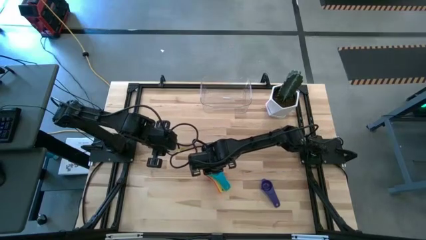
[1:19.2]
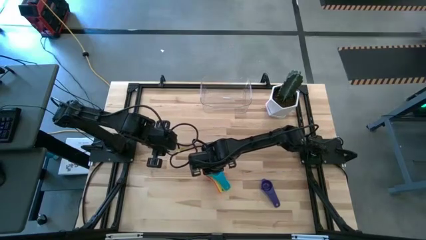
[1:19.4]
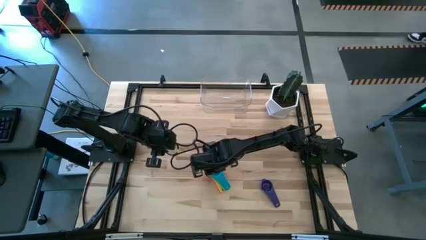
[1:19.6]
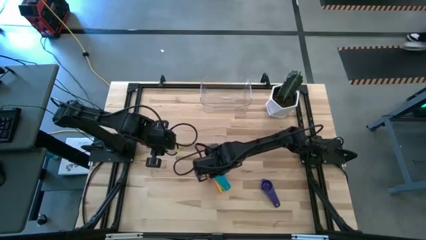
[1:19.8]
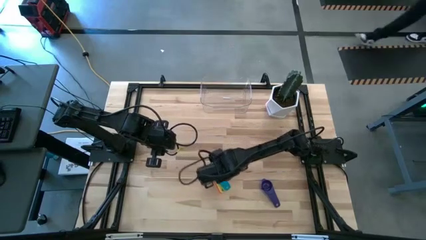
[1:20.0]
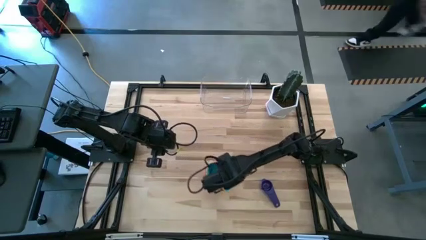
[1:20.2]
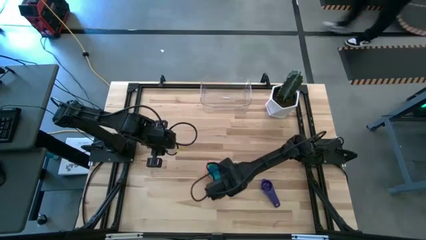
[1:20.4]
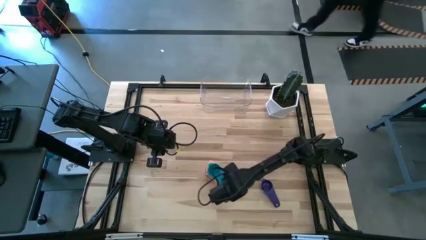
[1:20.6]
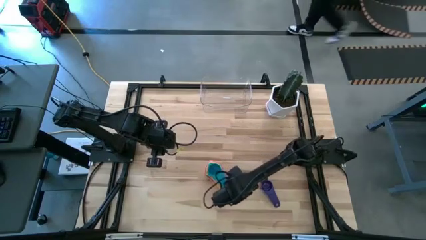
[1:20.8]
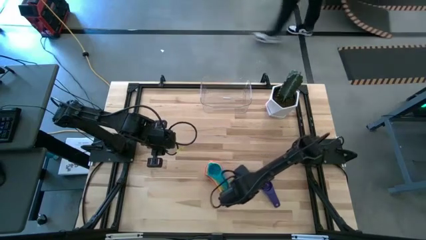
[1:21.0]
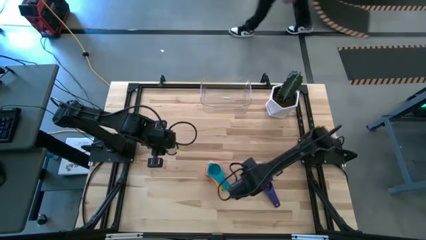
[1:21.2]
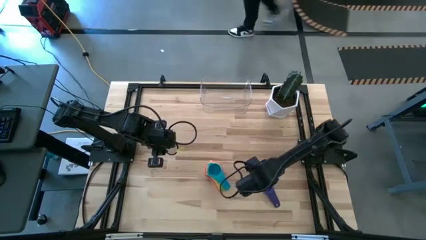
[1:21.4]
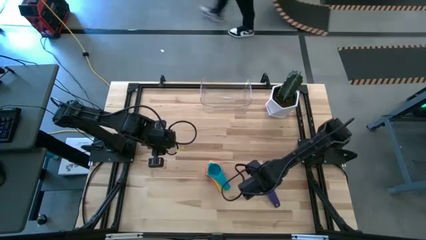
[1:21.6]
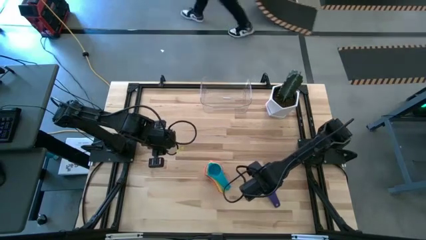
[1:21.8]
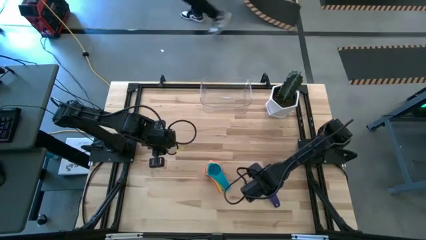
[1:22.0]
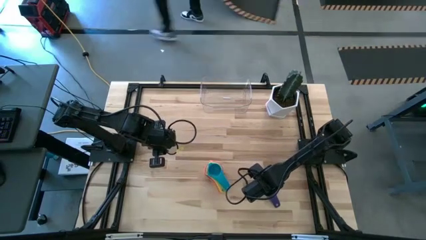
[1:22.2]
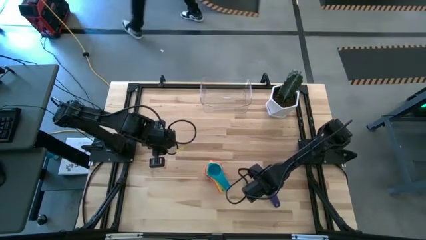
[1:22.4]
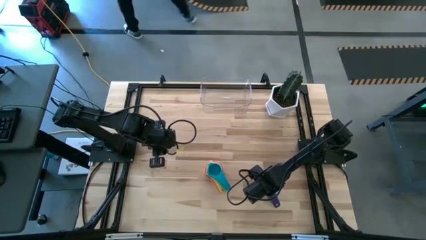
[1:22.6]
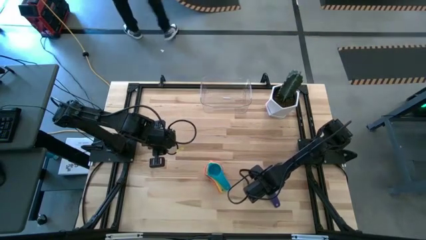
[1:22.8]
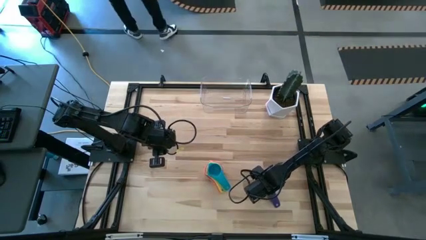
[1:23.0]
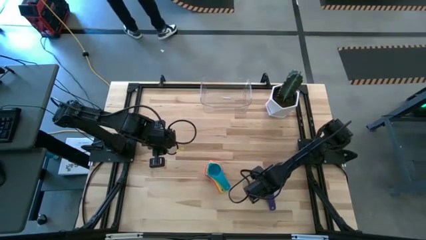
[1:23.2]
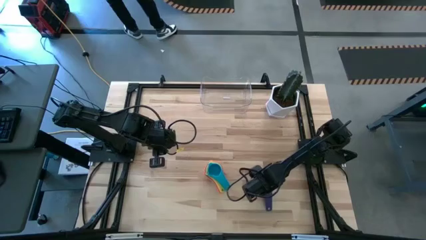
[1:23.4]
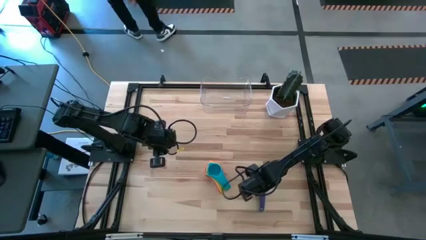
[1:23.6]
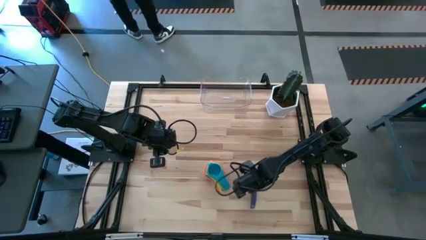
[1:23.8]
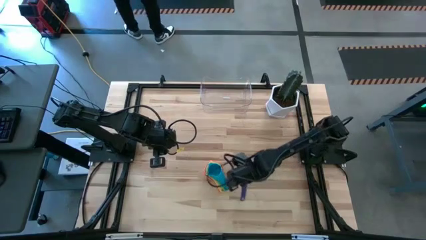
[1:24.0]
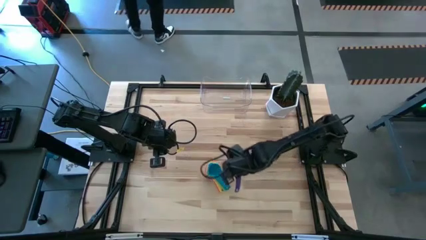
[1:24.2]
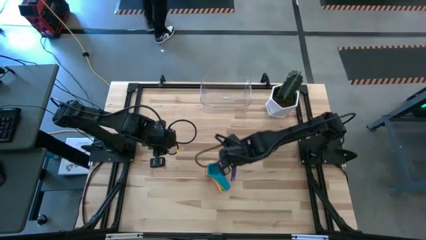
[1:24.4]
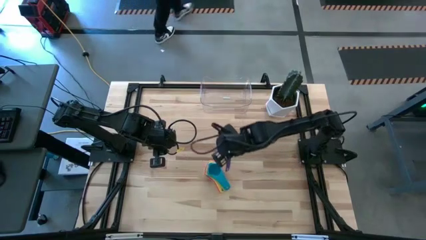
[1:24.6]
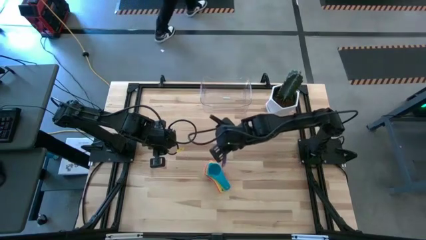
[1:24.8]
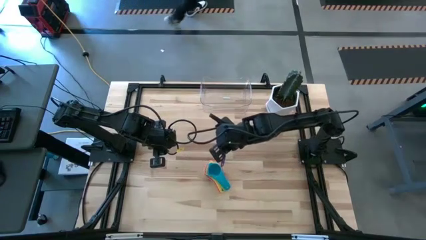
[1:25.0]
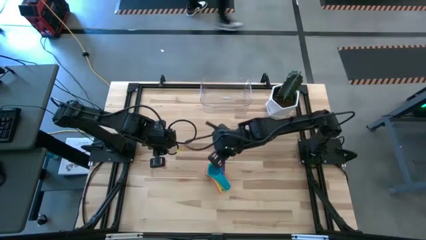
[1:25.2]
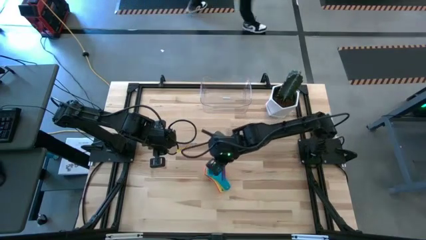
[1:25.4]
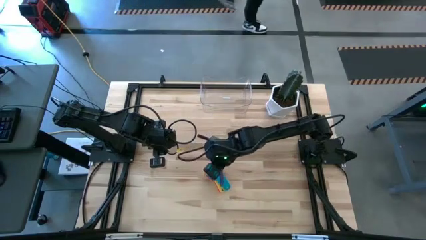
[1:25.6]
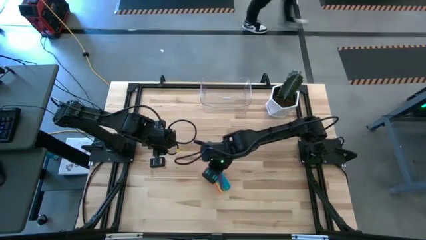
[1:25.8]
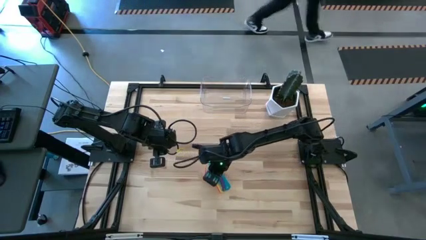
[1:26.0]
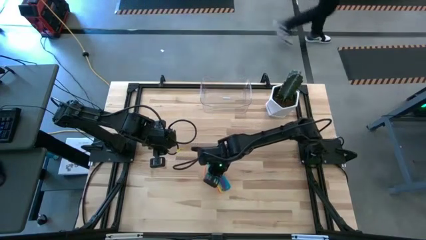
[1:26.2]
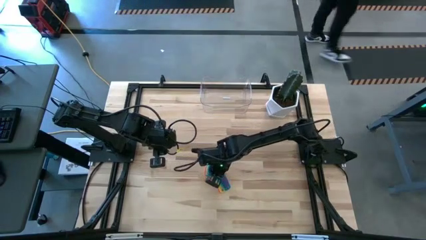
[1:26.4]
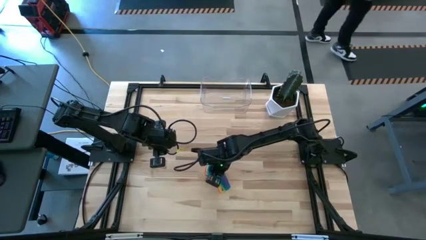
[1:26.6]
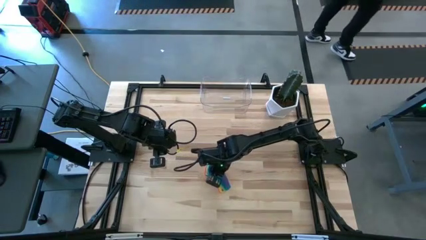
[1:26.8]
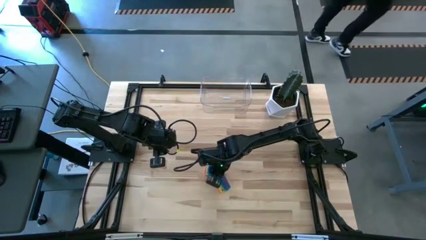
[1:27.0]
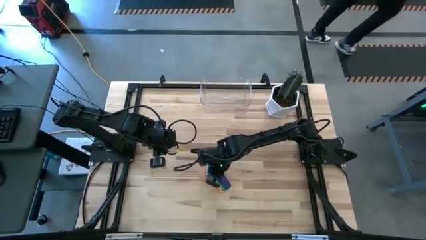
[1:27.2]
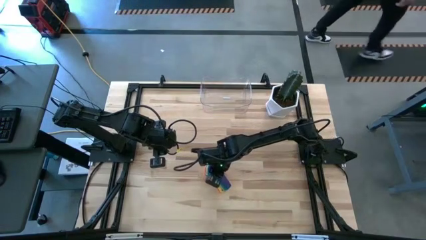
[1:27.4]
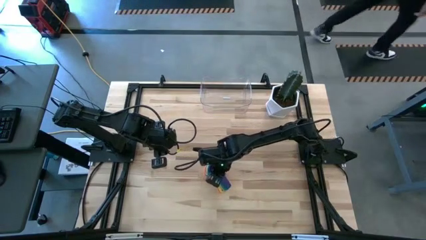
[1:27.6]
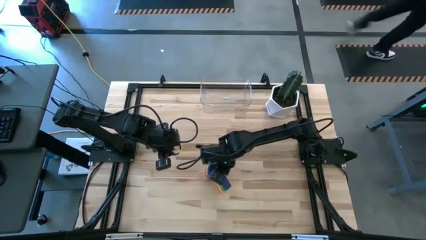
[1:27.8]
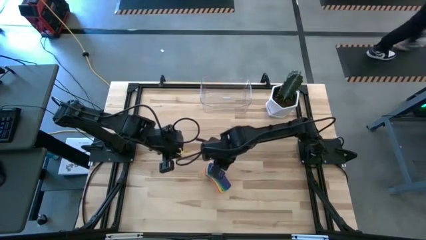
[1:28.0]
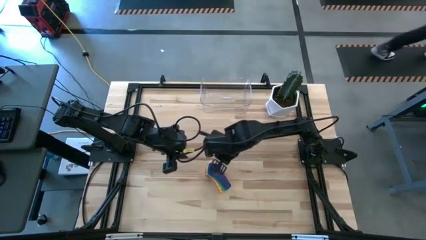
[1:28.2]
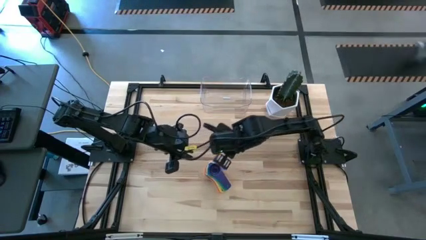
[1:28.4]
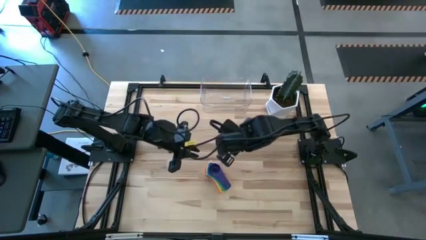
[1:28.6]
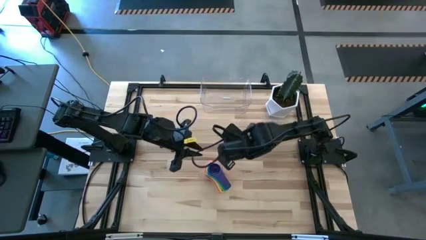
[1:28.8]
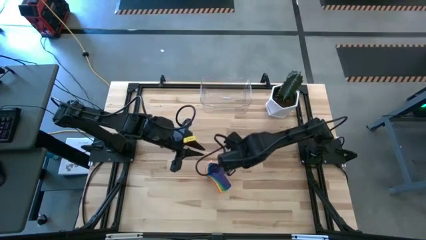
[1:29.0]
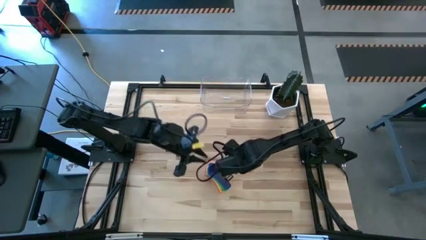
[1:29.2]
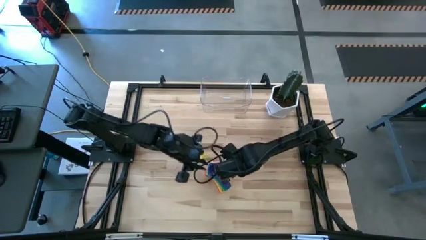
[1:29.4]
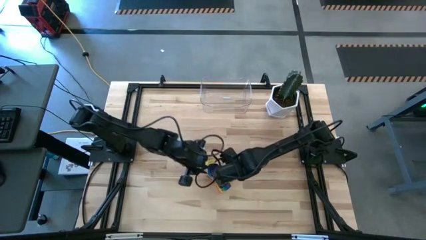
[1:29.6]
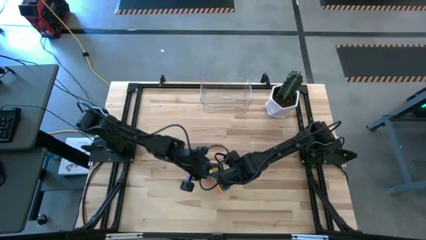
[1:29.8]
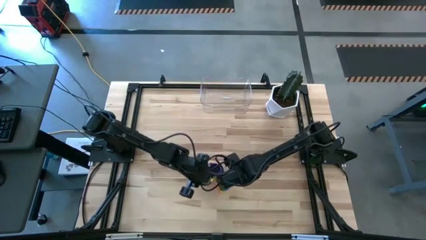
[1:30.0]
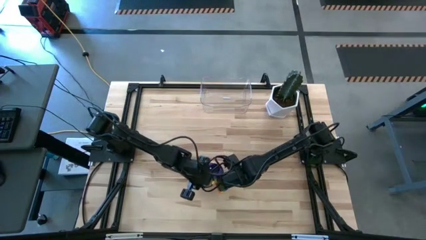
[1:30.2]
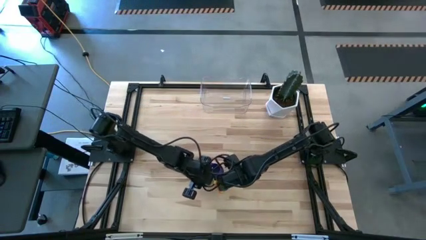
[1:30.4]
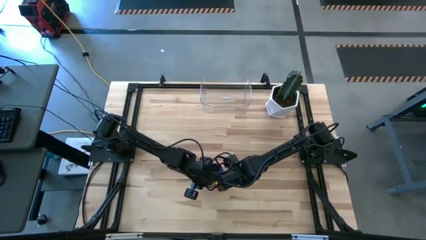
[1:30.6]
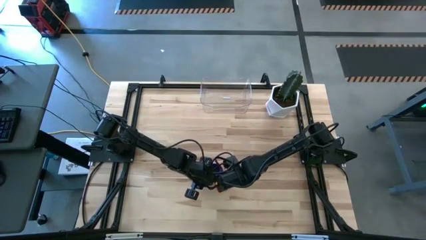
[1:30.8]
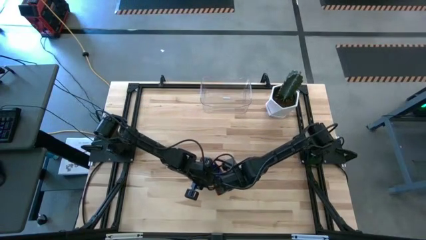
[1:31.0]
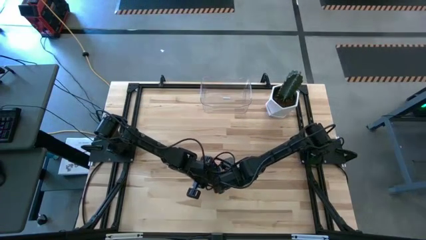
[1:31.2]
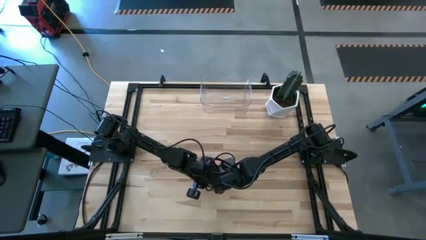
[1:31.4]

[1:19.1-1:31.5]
Task: Nest measuring cups in basket
Stack the violet measuring cup on top of the light blue measuring cup

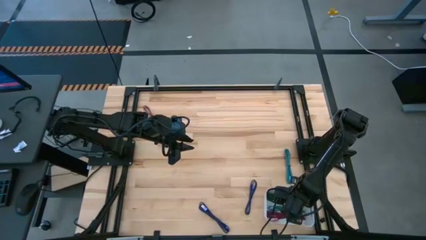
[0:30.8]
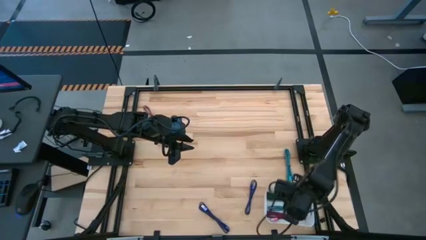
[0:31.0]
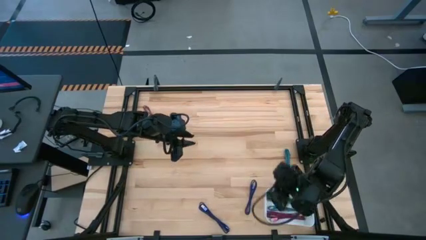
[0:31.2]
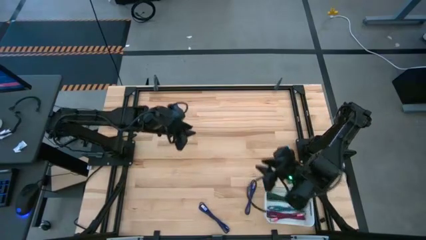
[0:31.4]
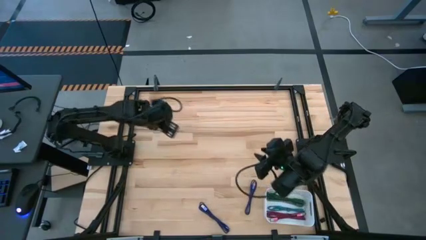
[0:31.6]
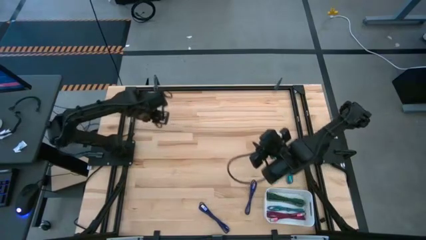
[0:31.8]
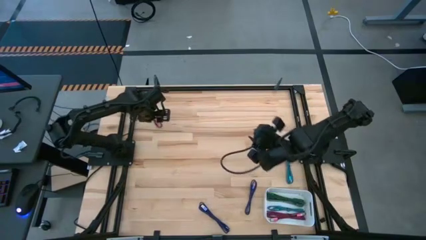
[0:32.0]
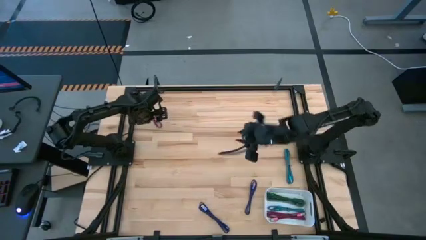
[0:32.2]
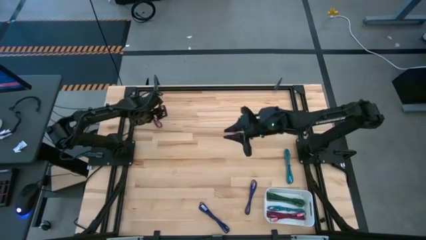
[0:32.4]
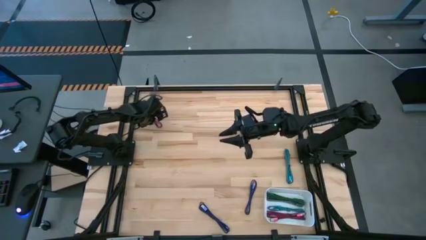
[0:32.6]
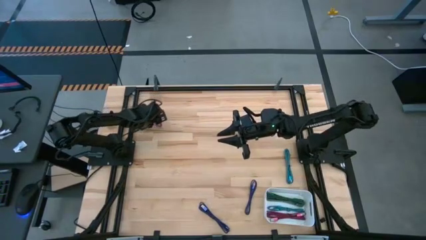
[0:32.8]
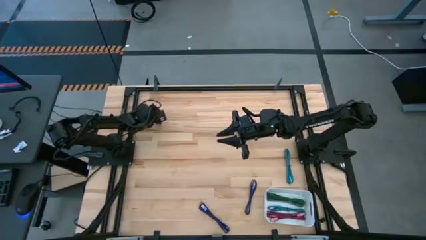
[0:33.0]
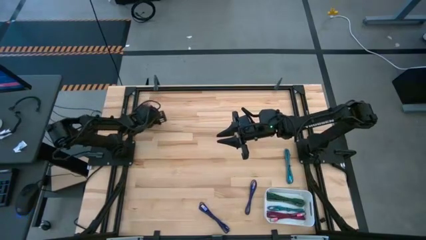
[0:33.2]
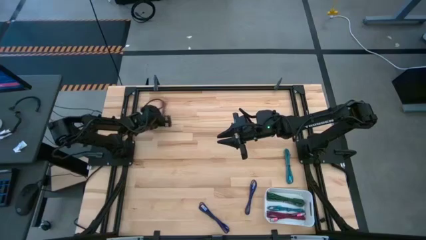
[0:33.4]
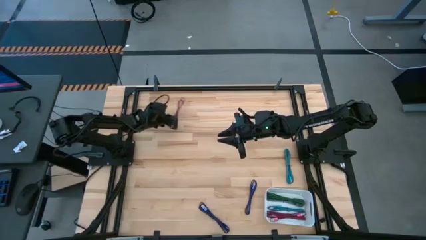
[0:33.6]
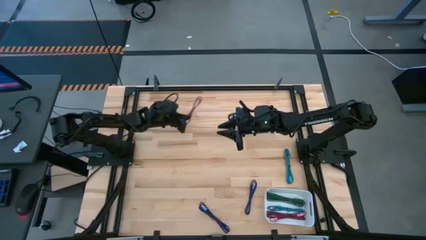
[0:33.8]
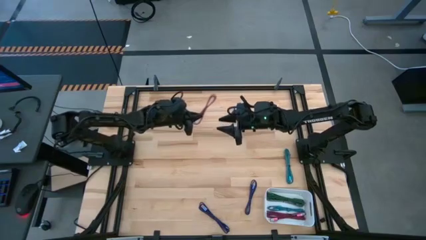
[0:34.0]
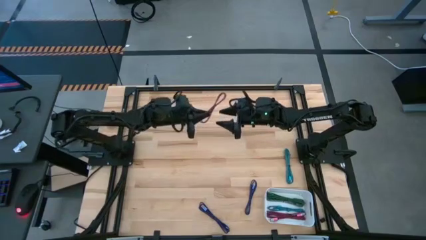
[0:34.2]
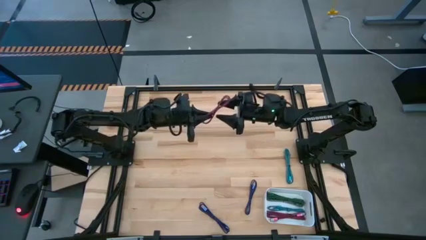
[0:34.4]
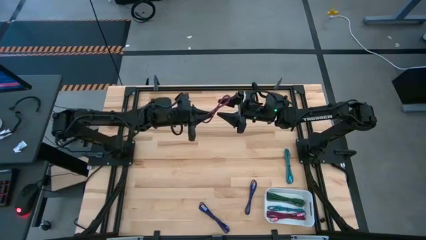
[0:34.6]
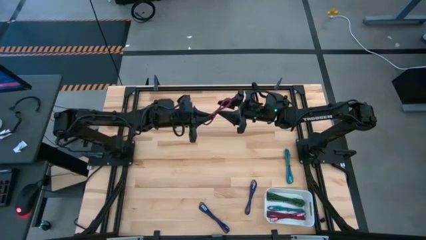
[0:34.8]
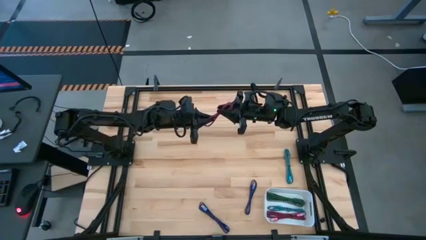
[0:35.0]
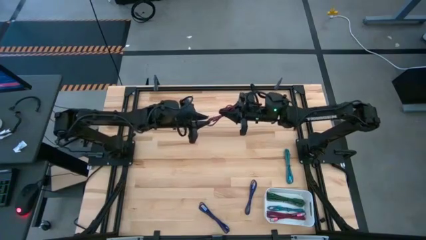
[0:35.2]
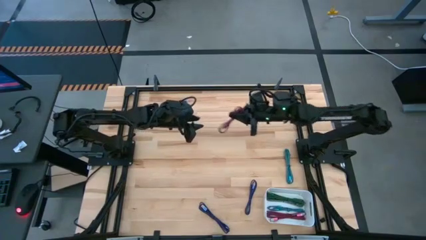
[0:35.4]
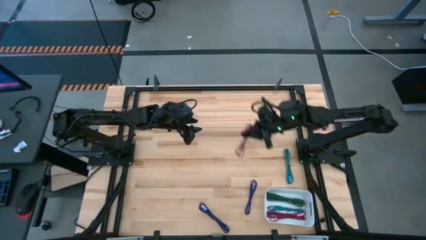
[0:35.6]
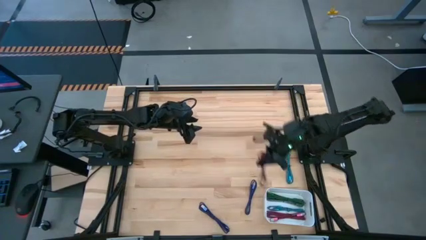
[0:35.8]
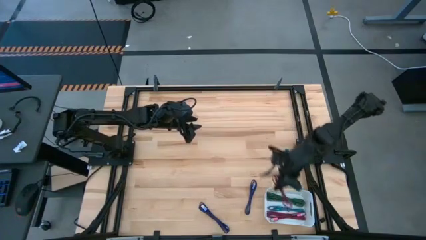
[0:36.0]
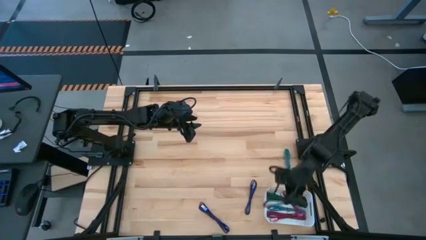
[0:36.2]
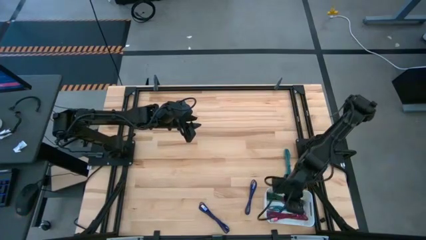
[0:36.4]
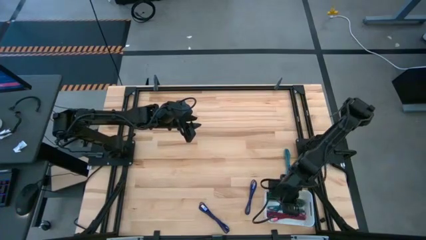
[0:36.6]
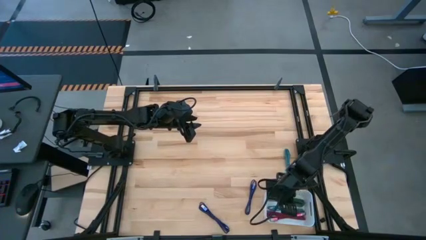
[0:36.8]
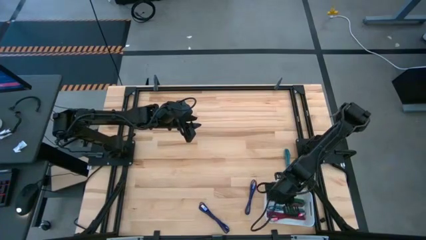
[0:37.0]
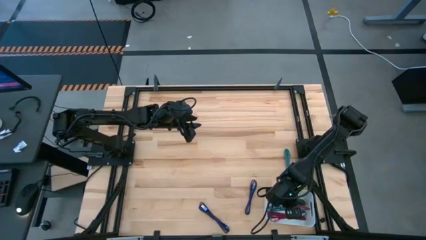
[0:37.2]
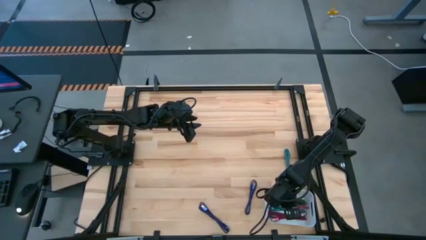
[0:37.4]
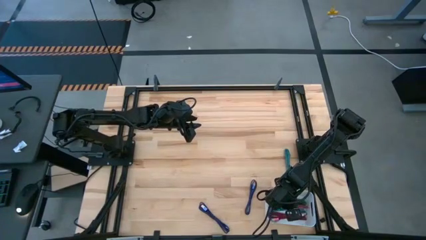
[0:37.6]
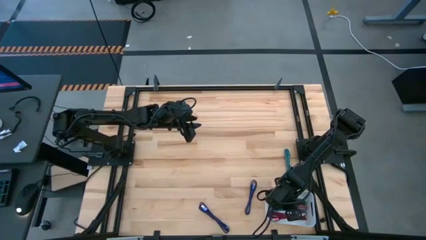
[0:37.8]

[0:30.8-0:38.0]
Task: Pick and place USB-C Cables
Put the pink USB cable into the white bin
